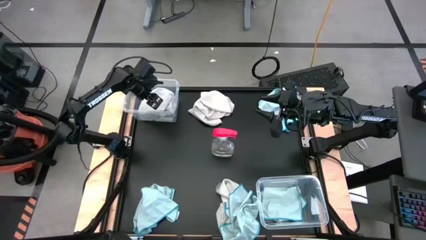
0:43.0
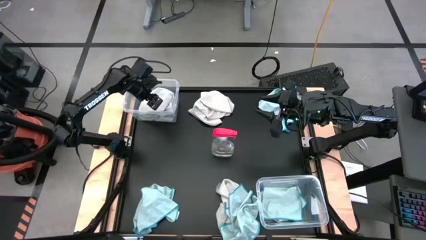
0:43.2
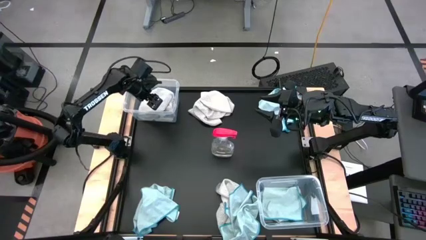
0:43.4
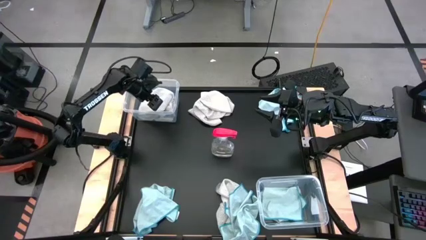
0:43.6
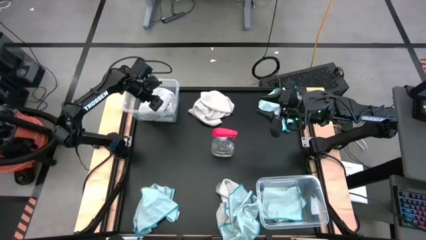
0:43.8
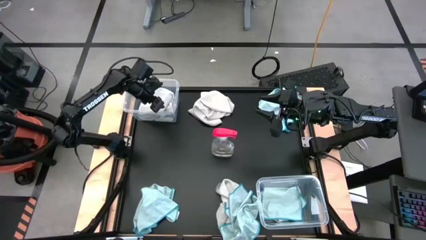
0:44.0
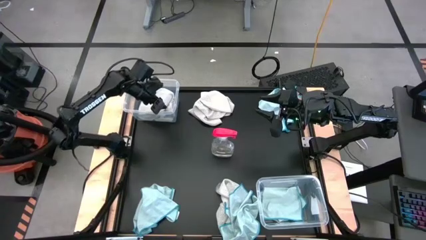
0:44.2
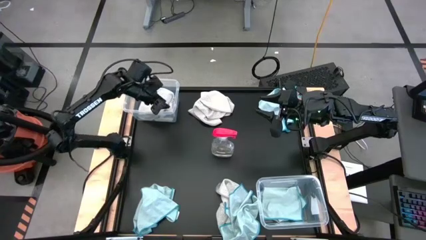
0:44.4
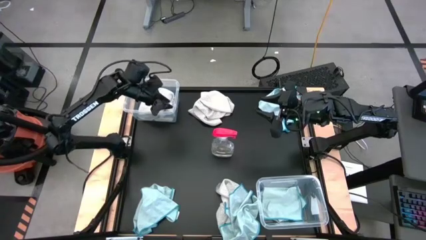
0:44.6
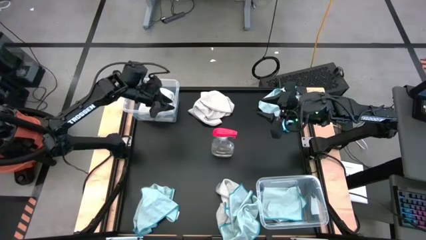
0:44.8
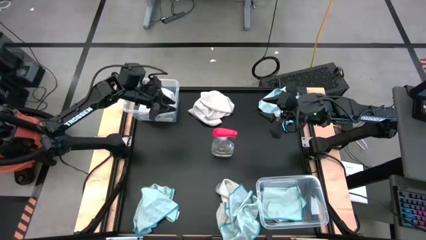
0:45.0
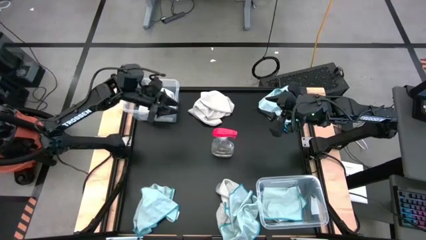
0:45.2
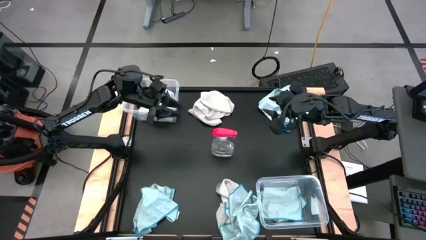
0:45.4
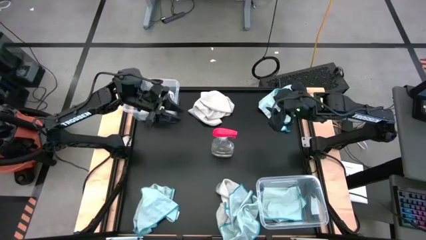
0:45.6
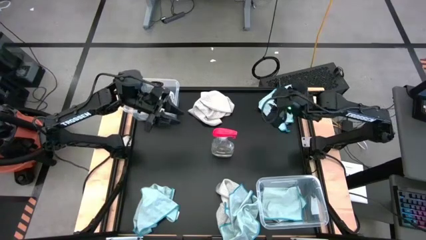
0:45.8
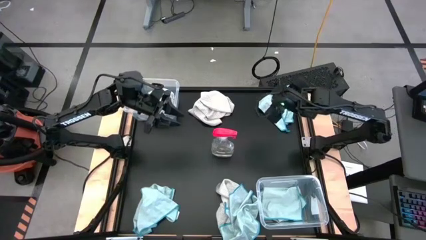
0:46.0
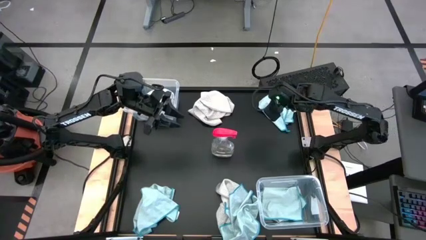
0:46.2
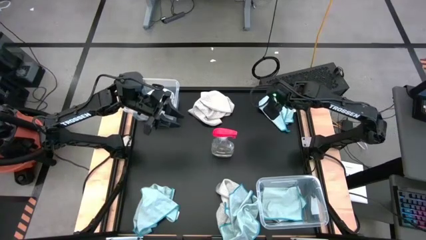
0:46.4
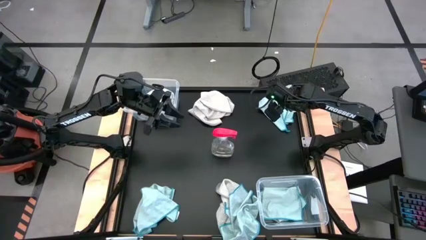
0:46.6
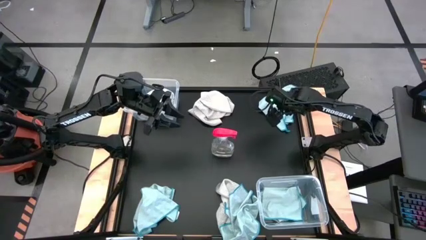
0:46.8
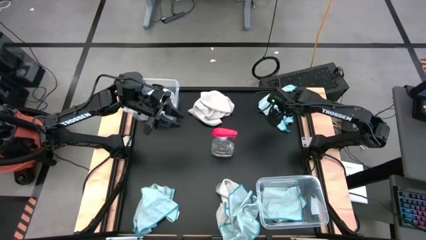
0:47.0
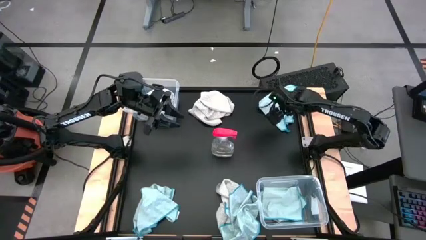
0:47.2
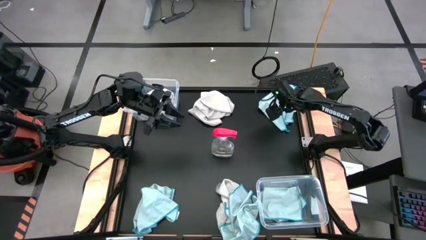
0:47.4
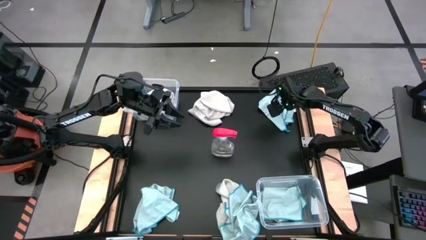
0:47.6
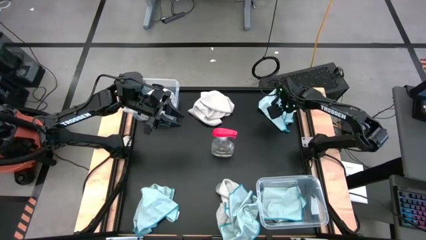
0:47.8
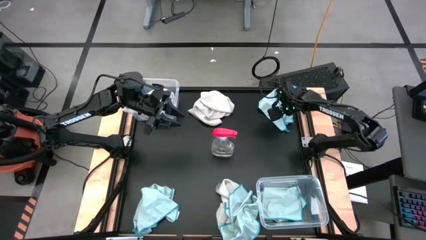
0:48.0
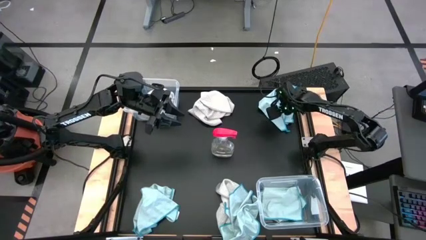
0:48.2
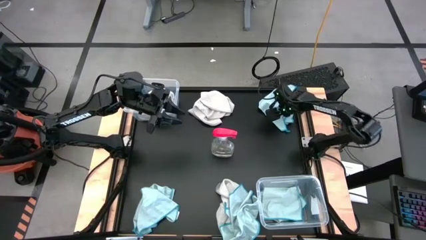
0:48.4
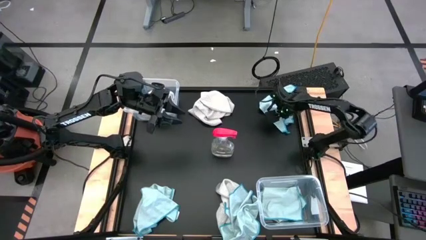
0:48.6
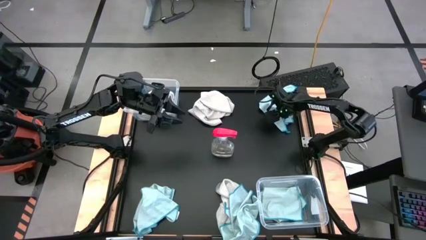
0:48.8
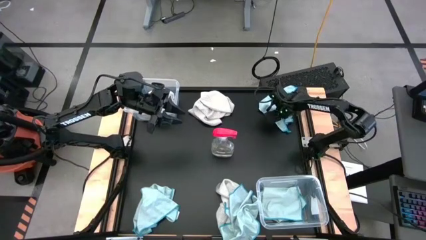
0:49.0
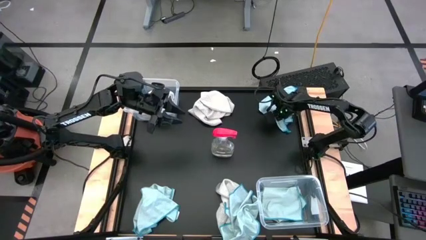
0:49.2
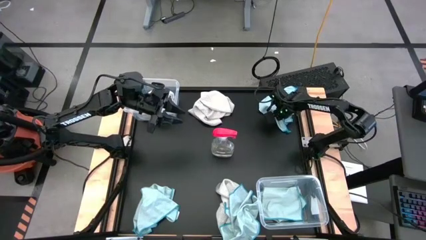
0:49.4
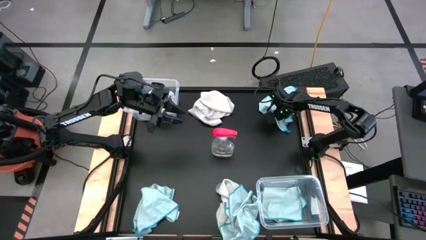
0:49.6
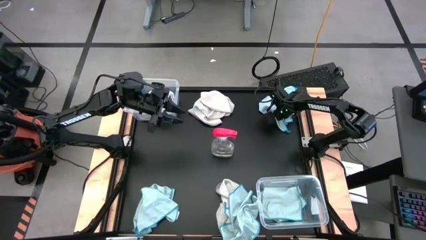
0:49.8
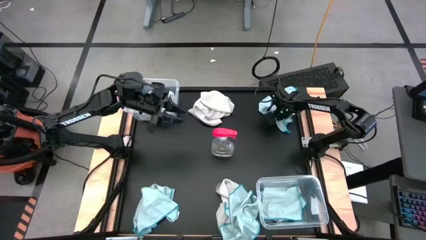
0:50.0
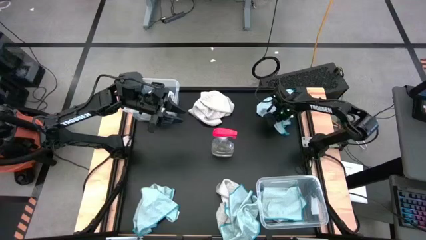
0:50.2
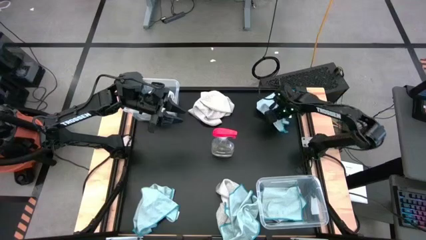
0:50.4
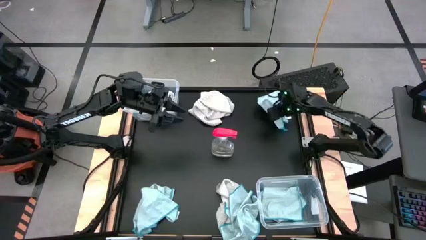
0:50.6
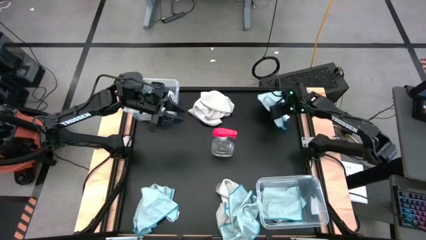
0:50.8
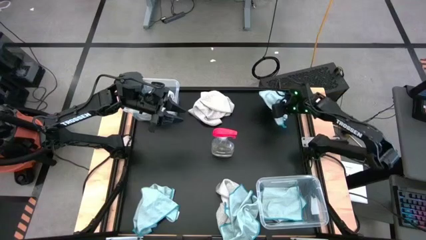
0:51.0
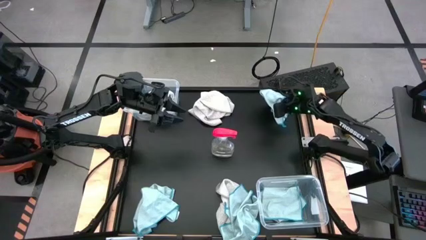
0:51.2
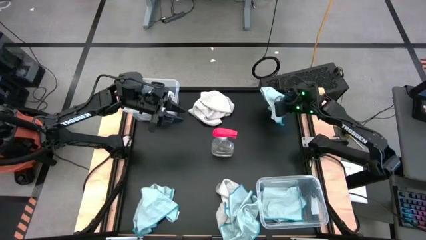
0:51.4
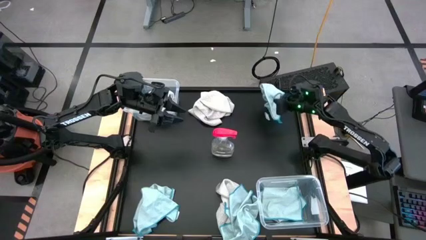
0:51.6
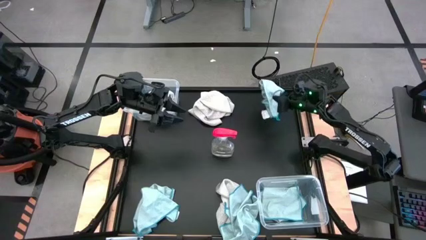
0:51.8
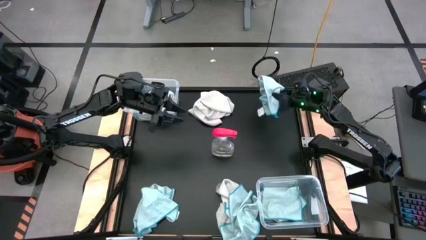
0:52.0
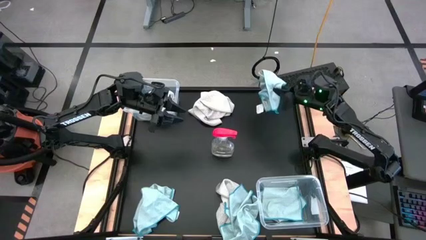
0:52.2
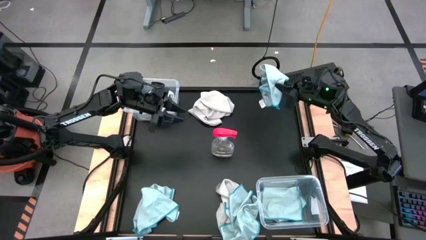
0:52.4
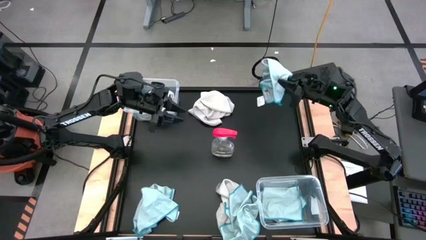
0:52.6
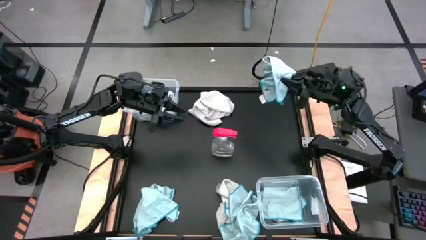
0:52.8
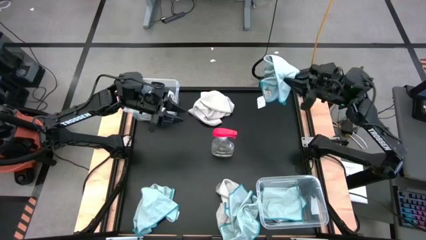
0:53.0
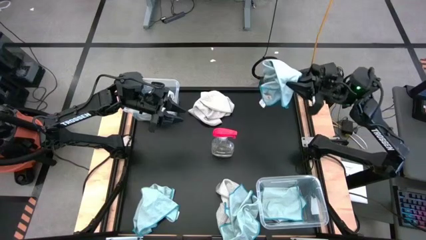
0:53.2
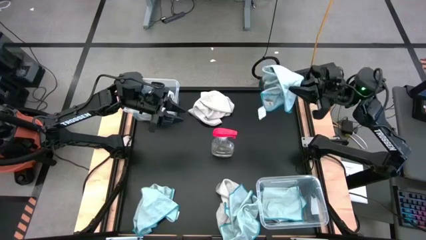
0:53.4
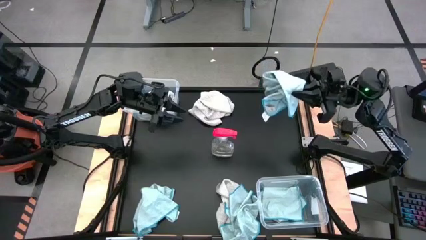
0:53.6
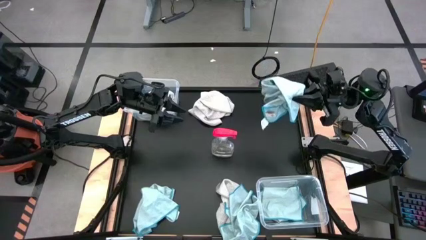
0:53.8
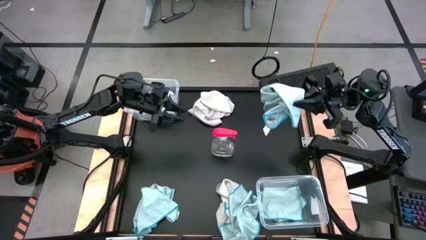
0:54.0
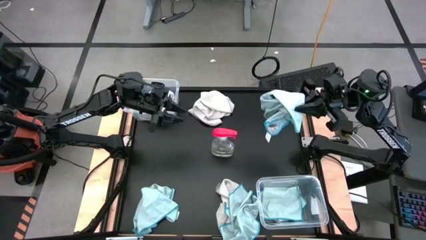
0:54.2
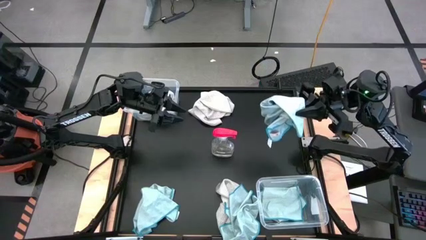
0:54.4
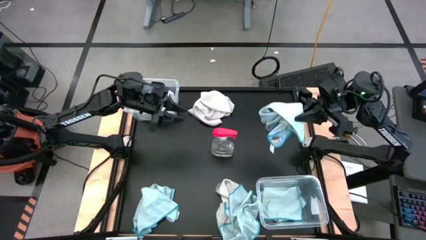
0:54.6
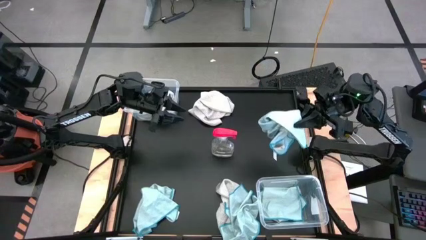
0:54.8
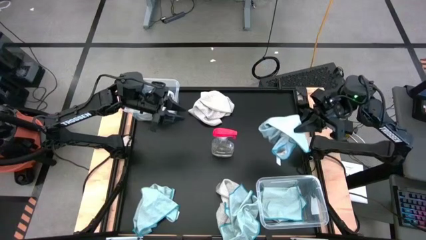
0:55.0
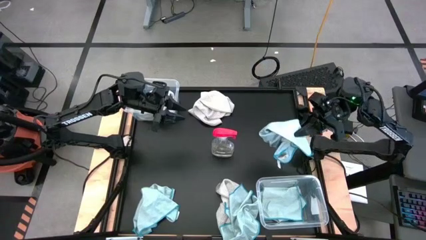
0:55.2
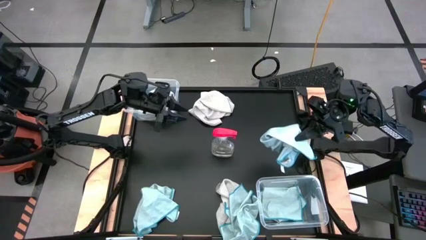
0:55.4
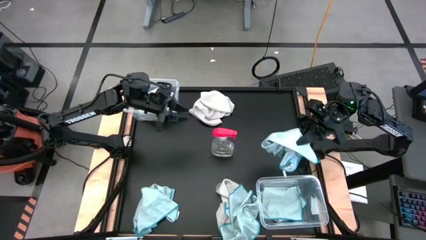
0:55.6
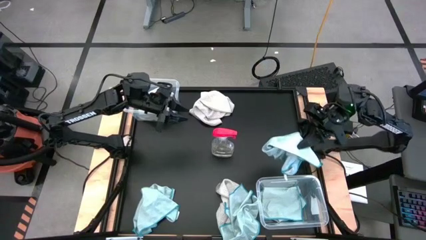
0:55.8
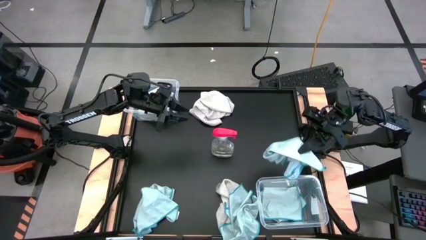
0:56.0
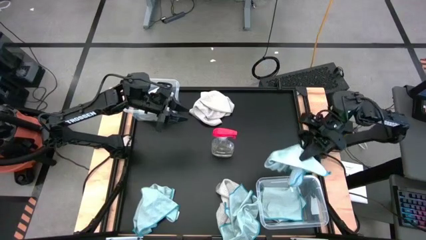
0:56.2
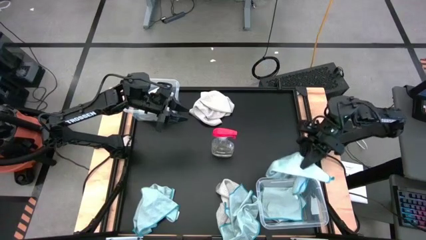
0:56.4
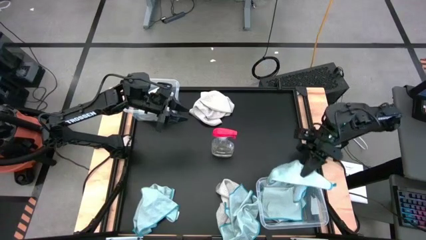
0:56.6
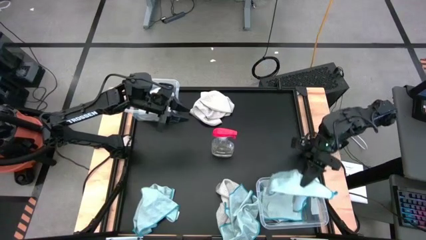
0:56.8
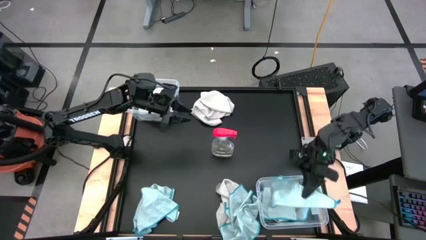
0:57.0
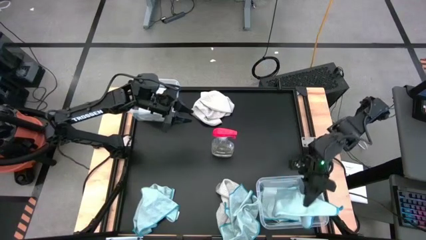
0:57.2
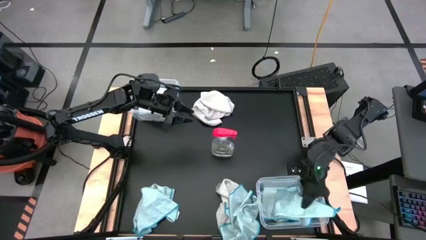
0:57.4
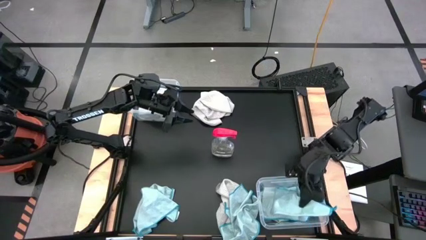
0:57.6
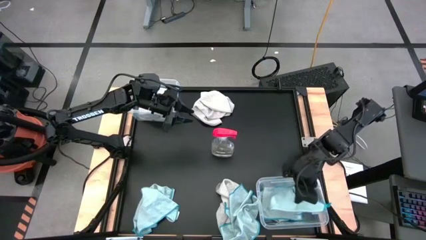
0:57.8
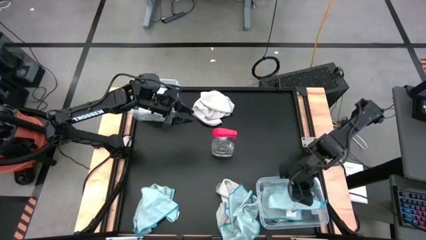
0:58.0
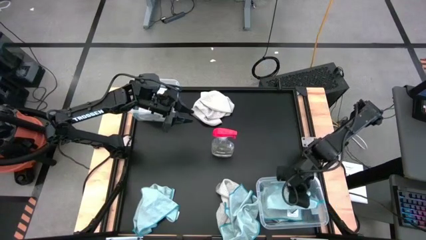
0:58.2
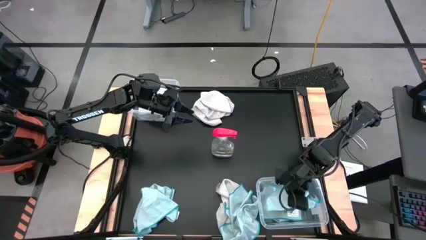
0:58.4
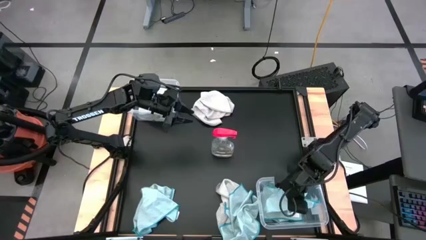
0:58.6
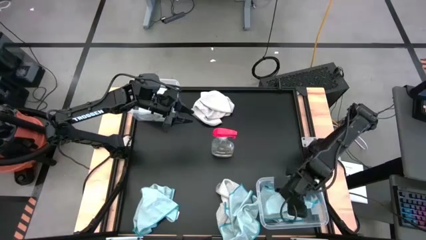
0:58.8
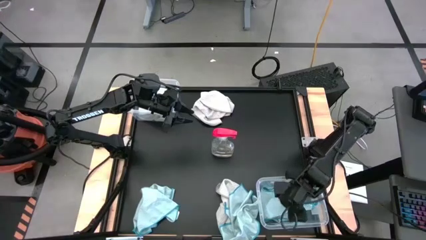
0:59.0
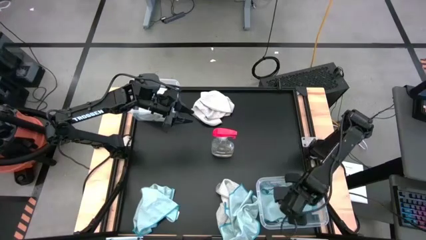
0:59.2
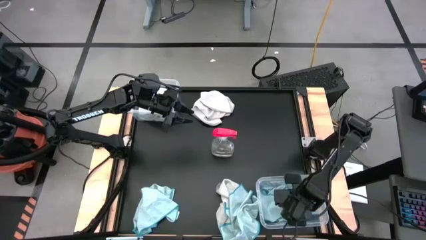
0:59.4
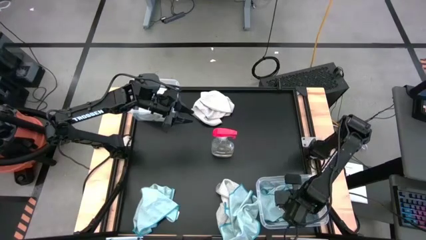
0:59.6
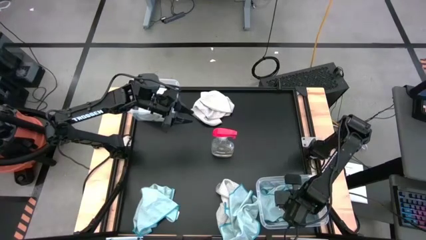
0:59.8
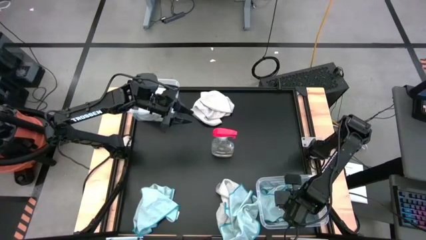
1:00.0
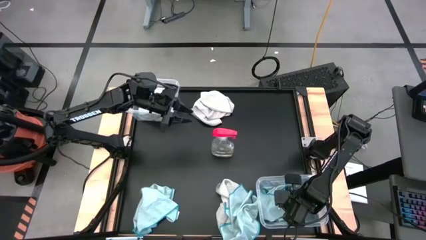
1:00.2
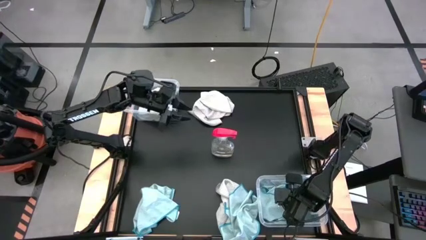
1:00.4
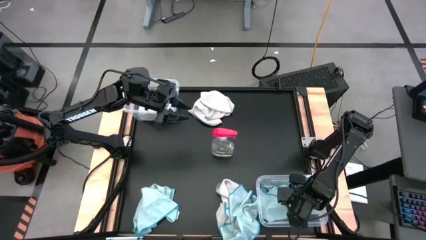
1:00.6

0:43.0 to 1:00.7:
Task: Sort microfiber towel by color & place in baskets
Put the blue towel into the bottom transparent bin
